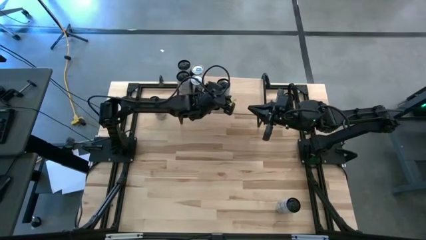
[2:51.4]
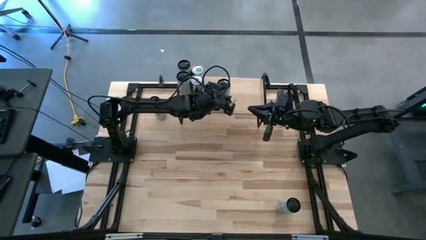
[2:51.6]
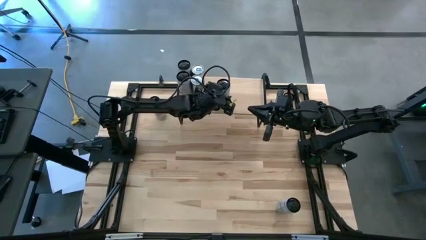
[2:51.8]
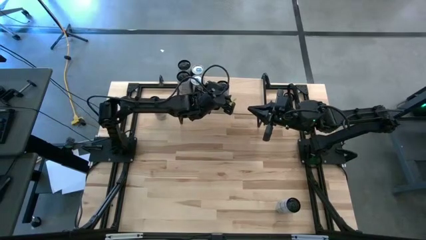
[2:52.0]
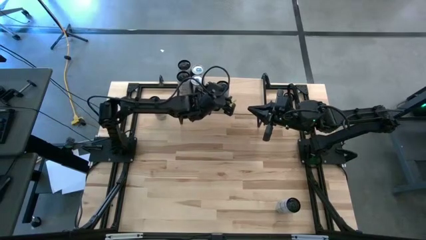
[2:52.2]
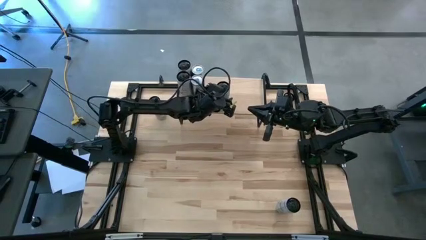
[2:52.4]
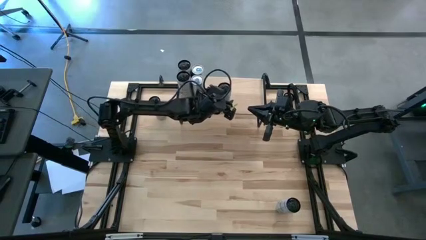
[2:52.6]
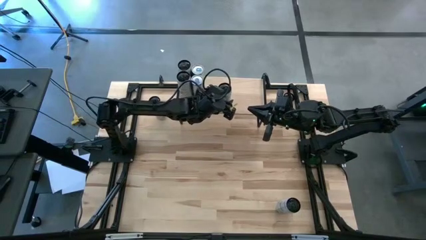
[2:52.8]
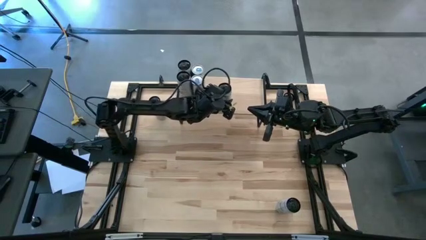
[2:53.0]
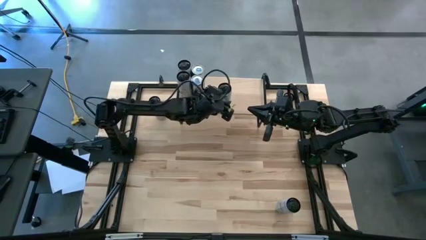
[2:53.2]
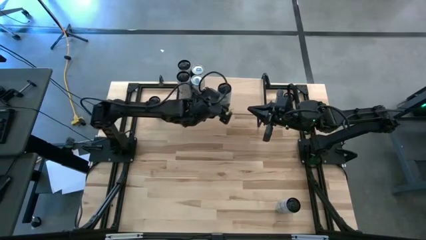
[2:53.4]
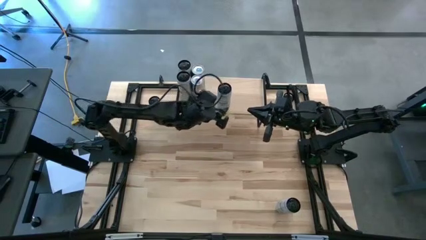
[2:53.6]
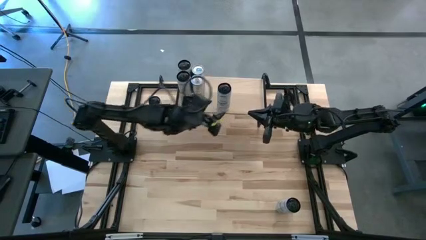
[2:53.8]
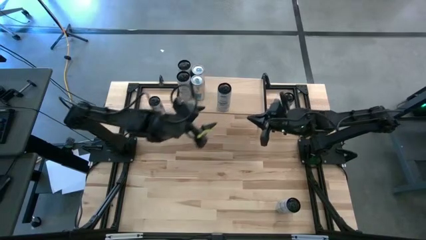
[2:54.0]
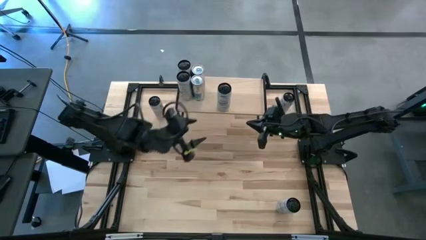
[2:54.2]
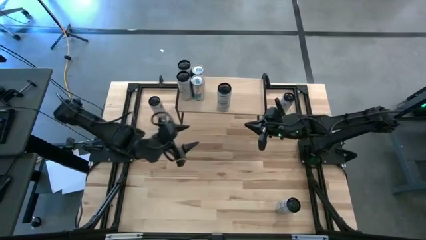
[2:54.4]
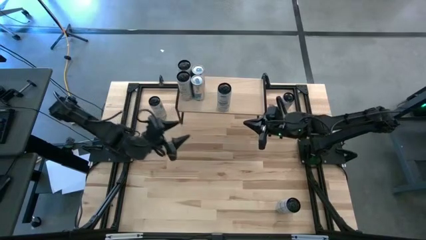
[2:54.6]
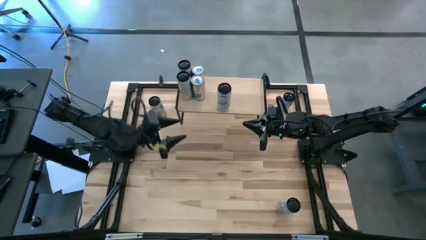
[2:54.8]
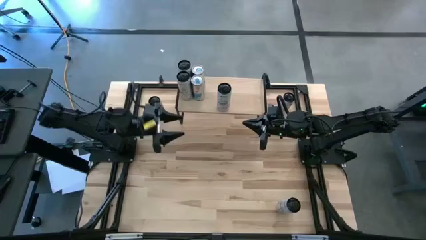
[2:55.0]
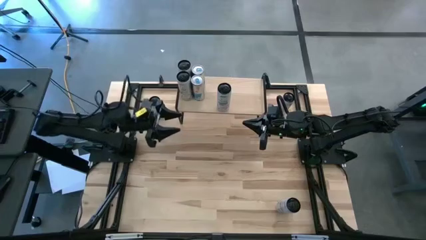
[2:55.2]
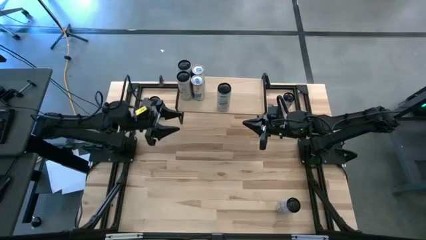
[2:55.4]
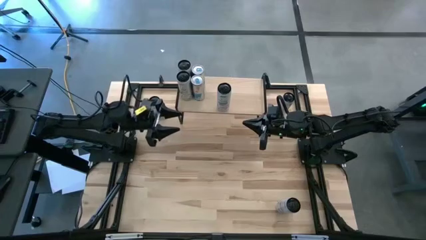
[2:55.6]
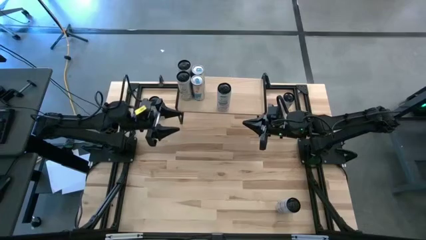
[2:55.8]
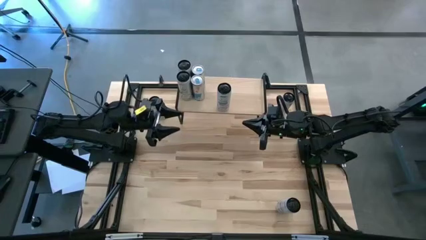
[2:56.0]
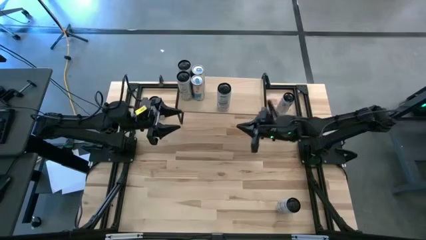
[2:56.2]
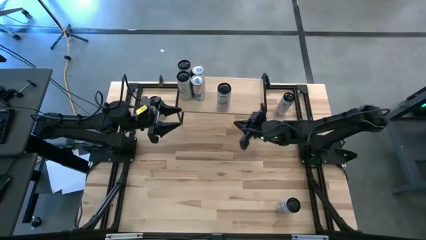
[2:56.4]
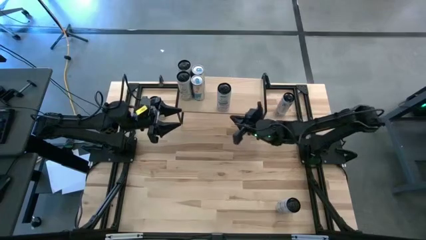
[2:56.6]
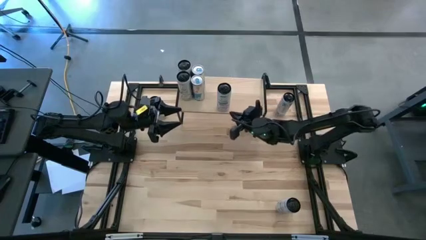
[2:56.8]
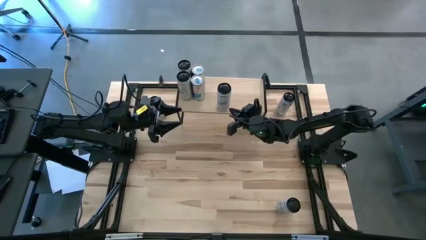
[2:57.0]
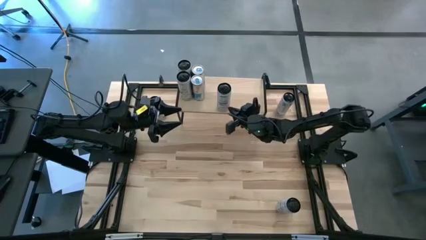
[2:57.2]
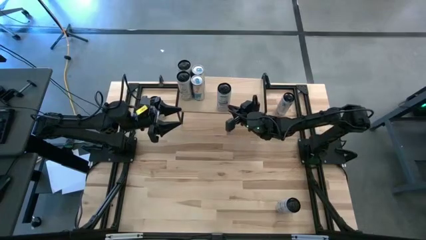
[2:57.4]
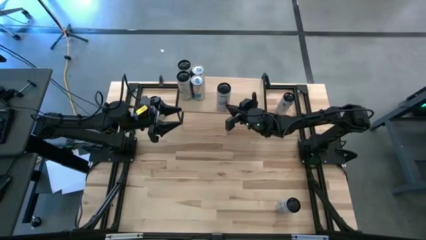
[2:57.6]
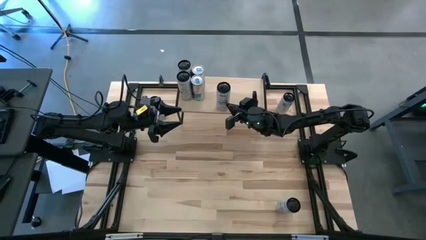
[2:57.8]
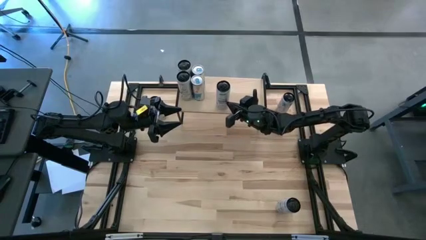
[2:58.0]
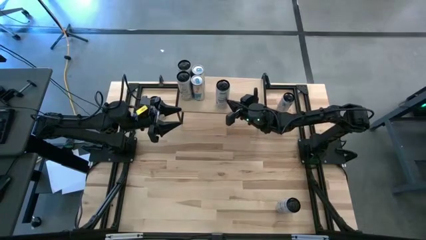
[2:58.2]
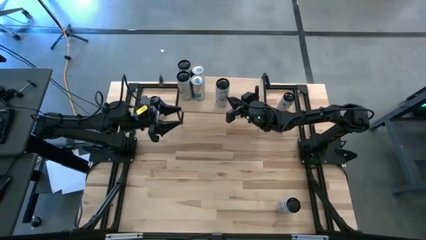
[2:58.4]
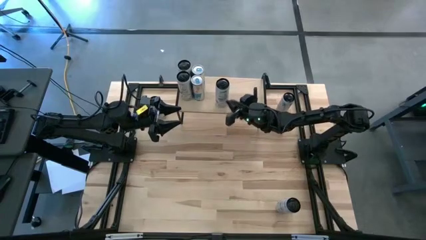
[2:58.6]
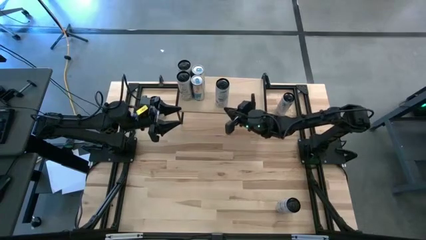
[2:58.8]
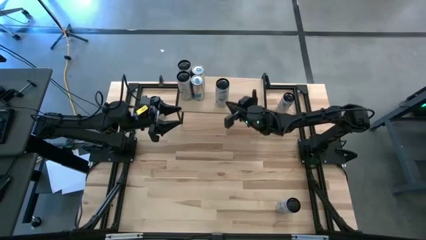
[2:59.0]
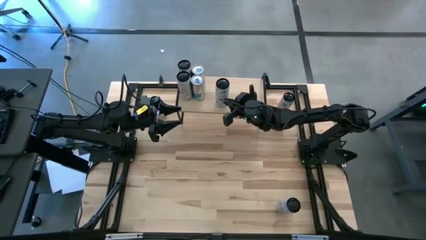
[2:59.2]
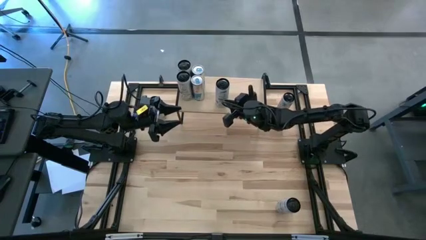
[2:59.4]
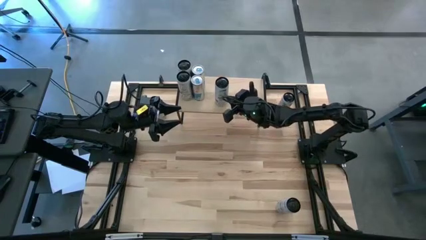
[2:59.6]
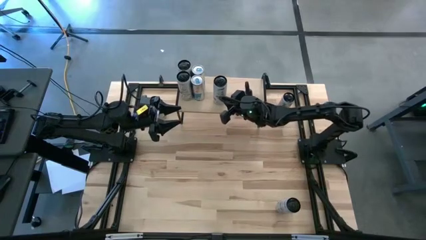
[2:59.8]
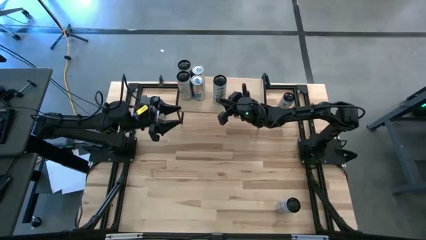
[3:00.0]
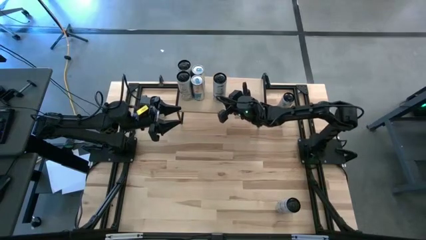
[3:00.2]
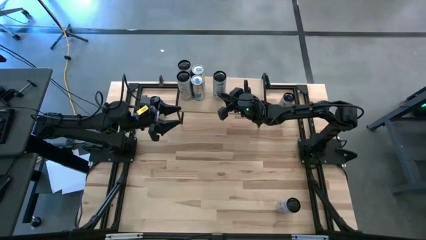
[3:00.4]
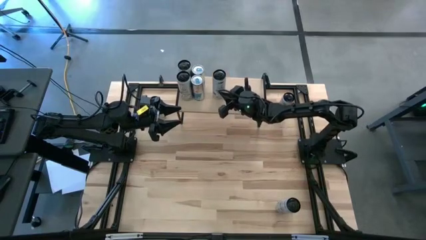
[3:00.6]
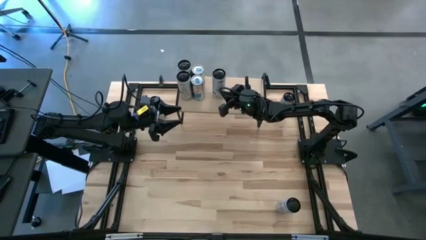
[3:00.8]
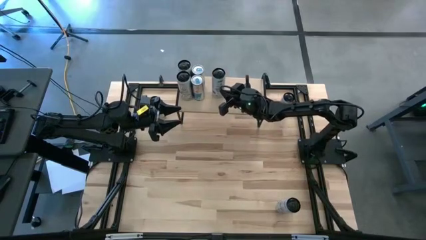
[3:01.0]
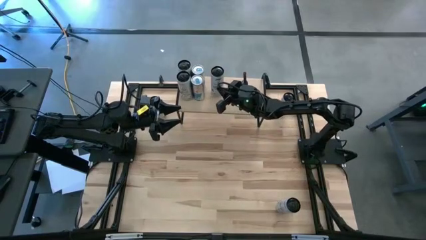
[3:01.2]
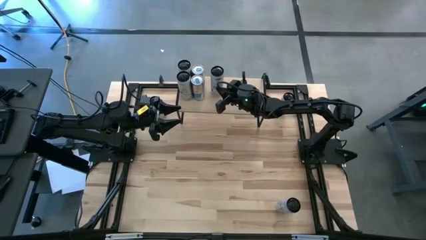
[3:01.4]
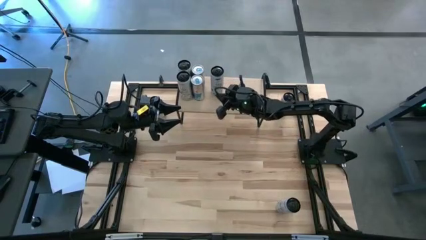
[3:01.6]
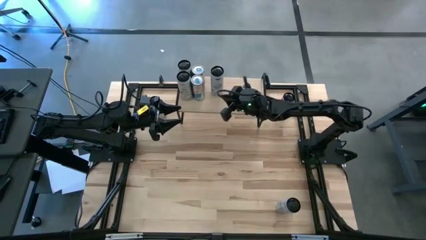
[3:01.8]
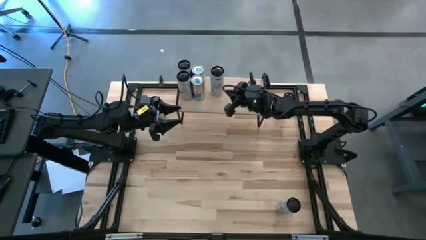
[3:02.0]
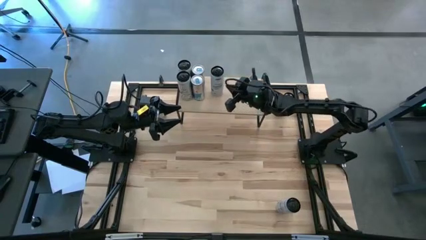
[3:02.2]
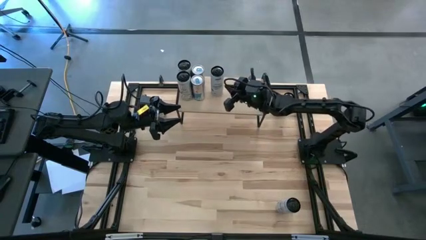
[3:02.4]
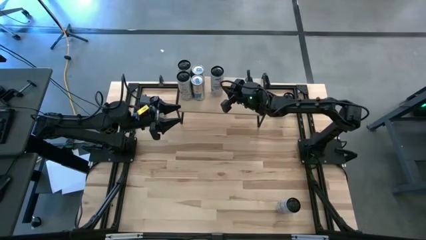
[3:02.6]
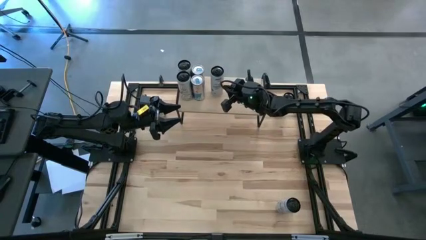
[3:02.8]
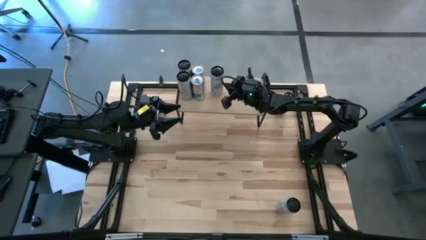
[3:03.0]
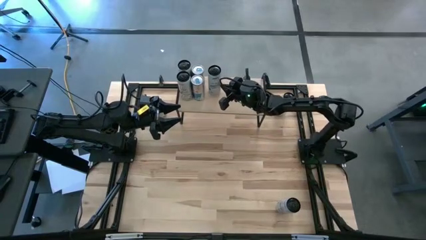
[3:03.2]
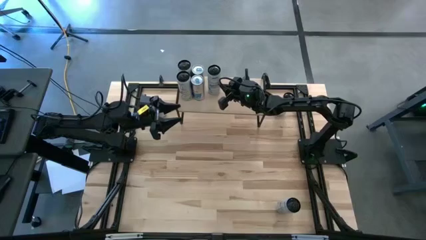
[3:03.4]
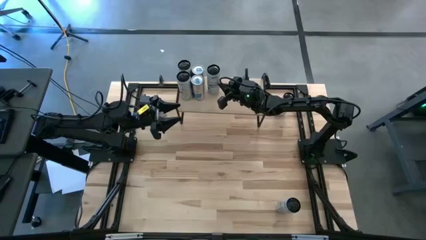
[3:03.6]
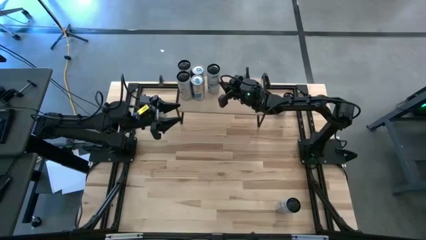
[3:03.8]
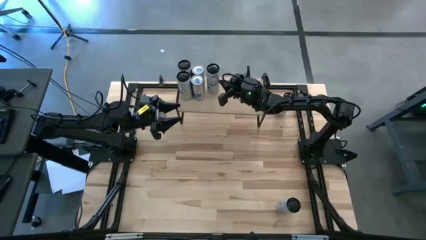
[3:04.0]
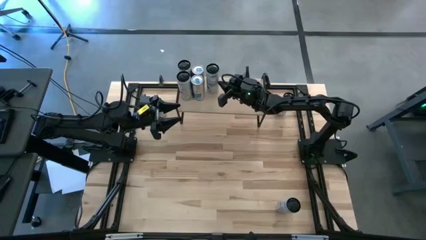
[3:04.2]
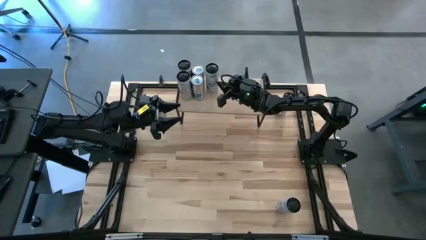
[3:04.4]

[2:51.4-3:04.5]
Task: Place canned beverage on shelf
Put the bottom left black soda can on the shelf
